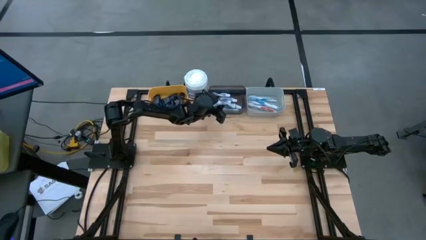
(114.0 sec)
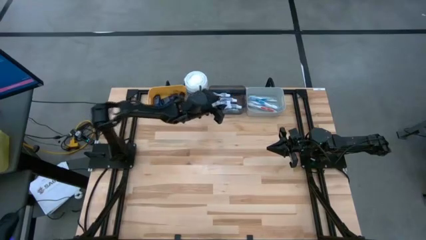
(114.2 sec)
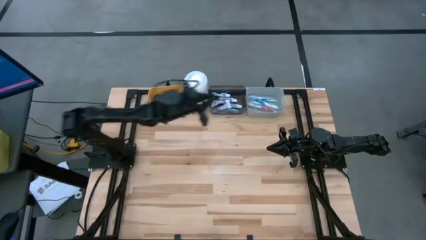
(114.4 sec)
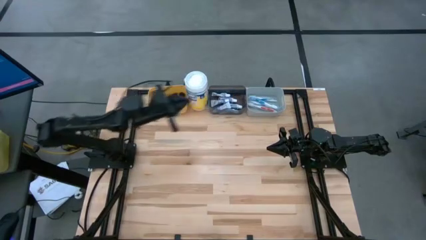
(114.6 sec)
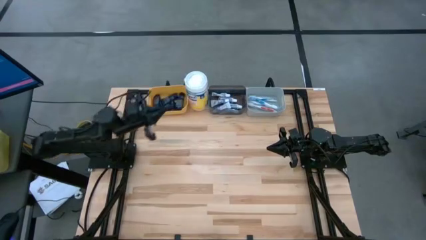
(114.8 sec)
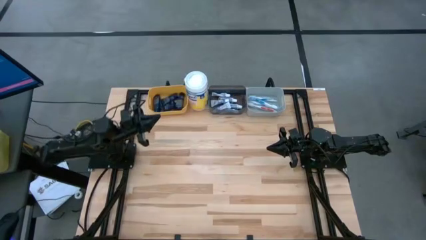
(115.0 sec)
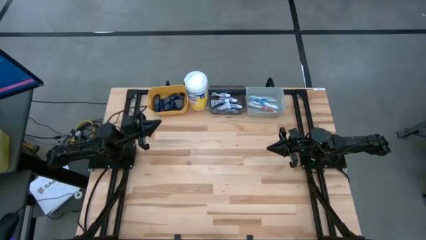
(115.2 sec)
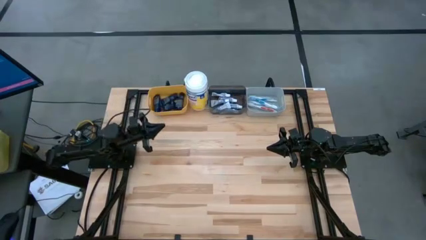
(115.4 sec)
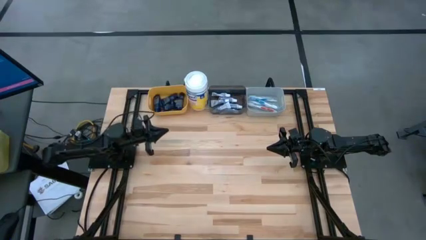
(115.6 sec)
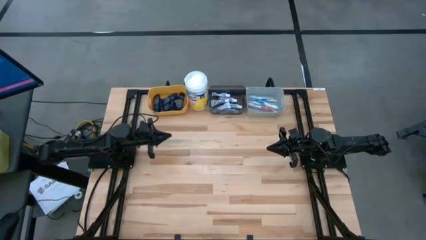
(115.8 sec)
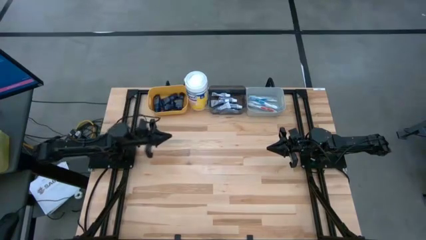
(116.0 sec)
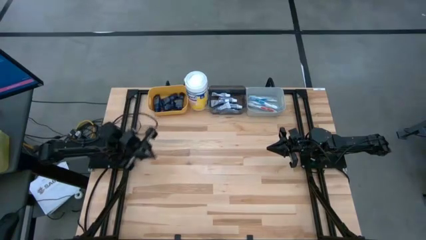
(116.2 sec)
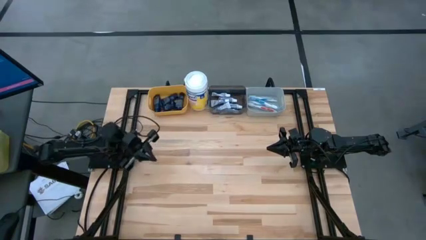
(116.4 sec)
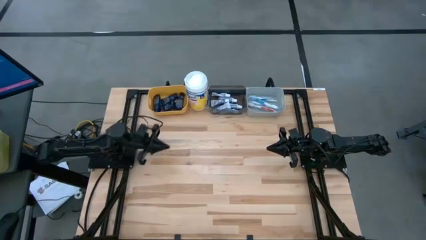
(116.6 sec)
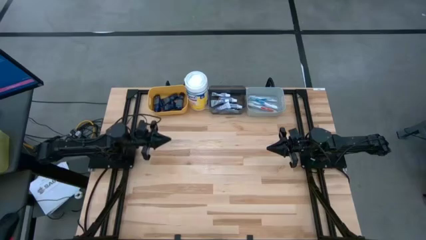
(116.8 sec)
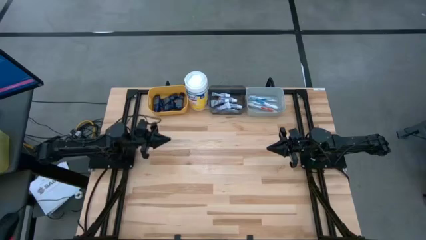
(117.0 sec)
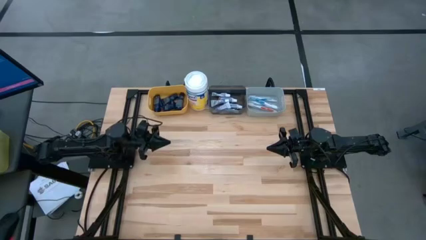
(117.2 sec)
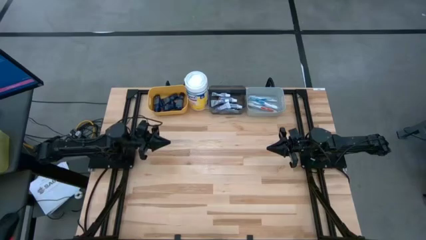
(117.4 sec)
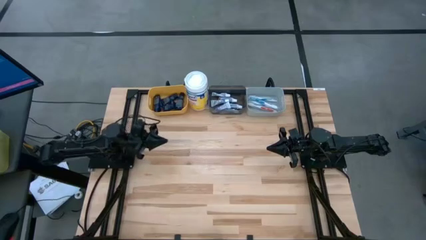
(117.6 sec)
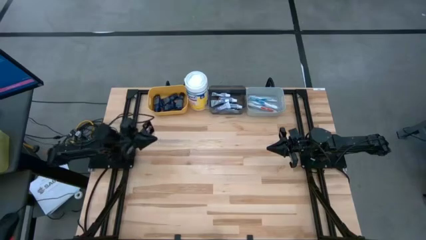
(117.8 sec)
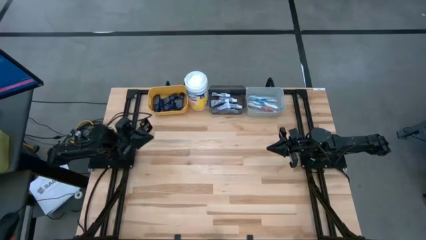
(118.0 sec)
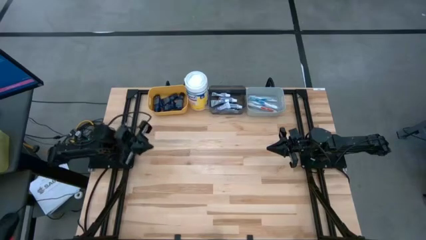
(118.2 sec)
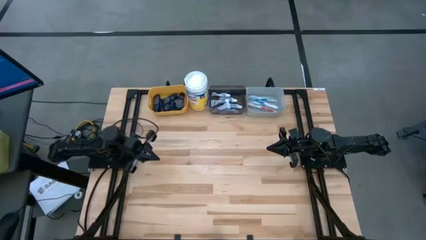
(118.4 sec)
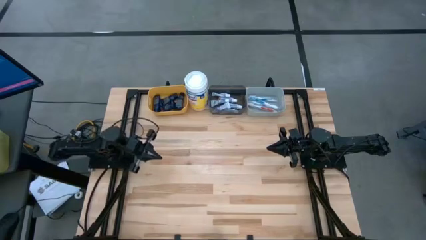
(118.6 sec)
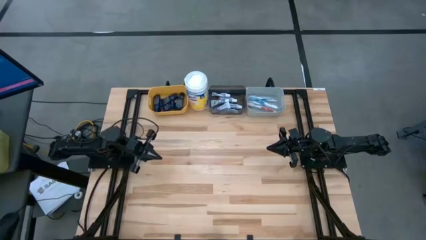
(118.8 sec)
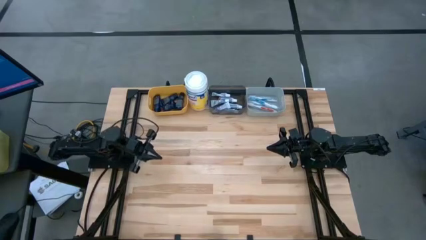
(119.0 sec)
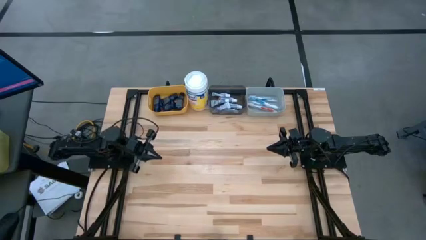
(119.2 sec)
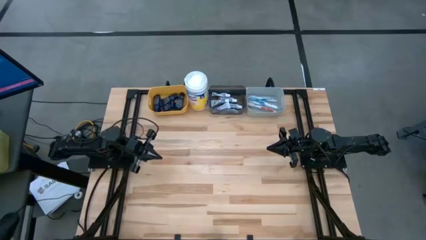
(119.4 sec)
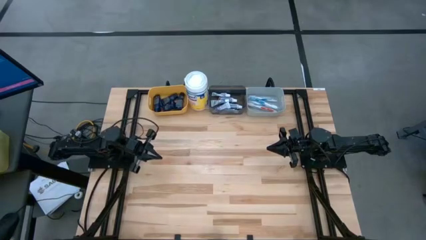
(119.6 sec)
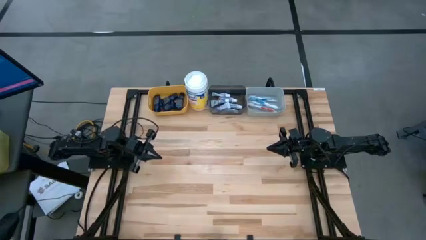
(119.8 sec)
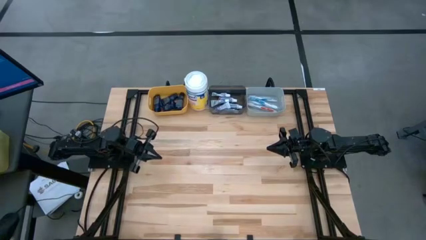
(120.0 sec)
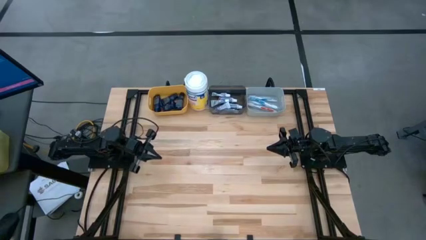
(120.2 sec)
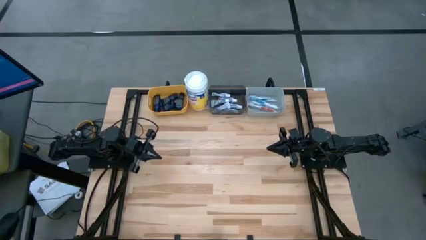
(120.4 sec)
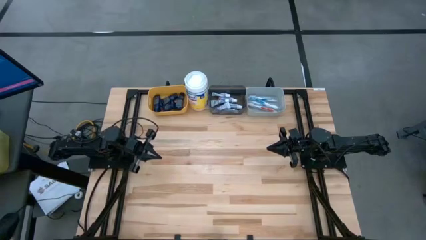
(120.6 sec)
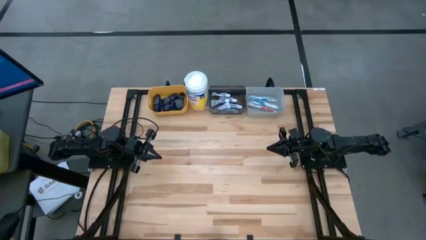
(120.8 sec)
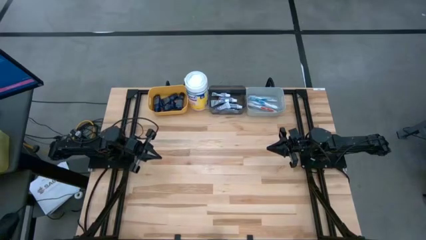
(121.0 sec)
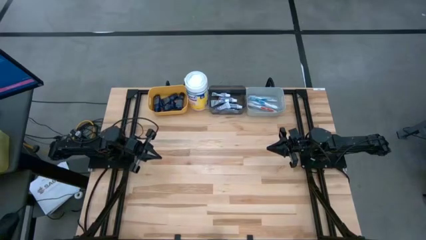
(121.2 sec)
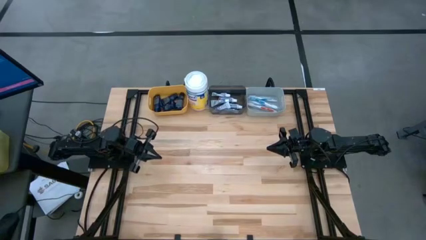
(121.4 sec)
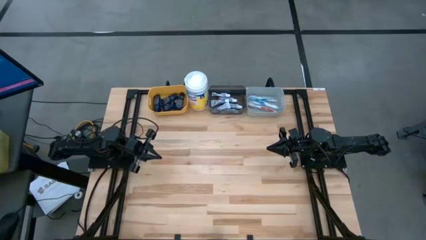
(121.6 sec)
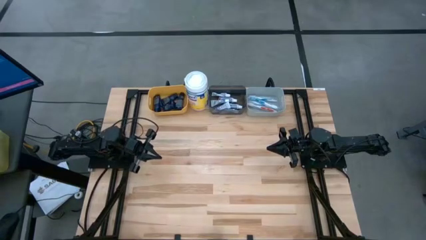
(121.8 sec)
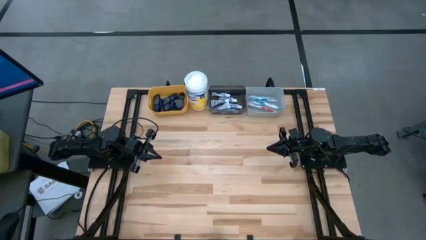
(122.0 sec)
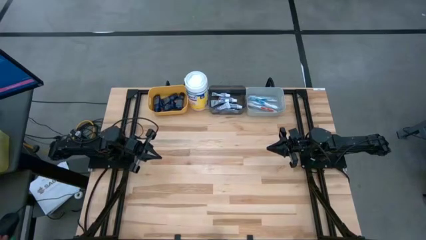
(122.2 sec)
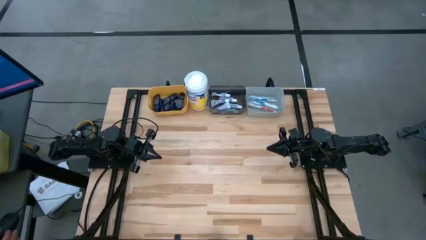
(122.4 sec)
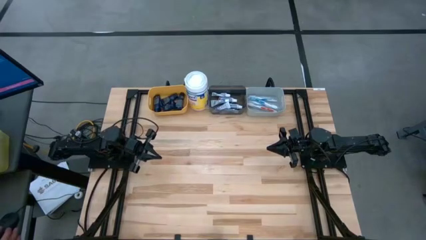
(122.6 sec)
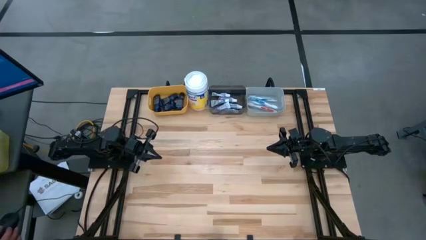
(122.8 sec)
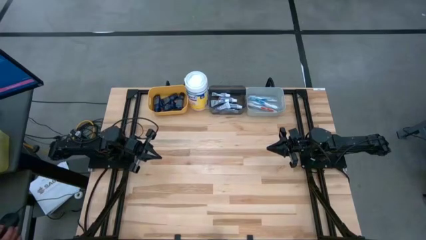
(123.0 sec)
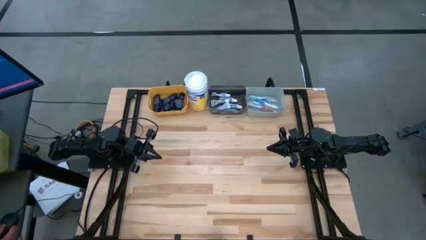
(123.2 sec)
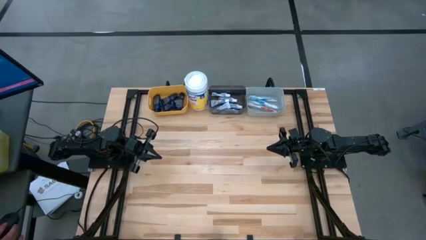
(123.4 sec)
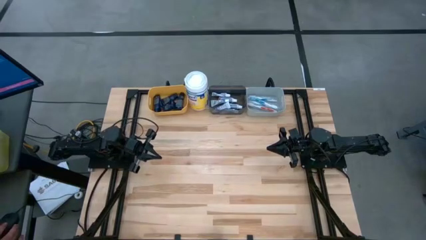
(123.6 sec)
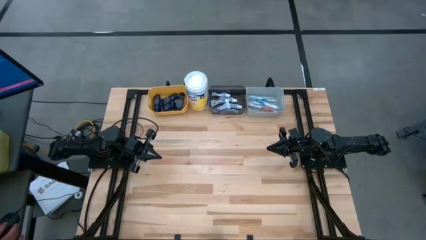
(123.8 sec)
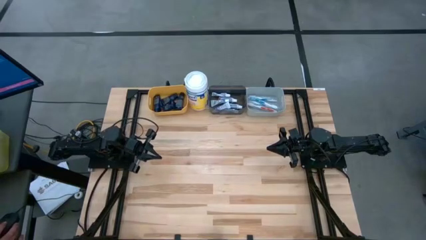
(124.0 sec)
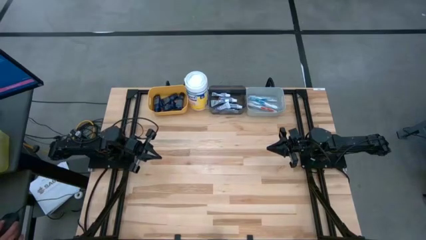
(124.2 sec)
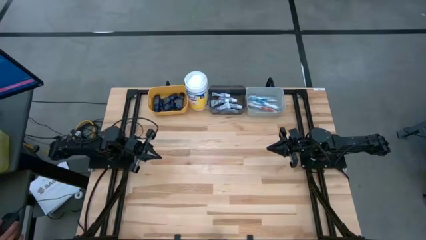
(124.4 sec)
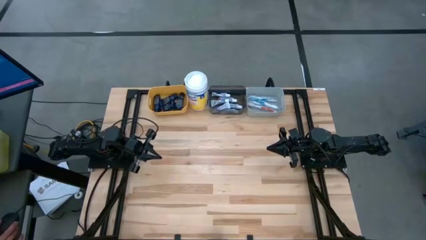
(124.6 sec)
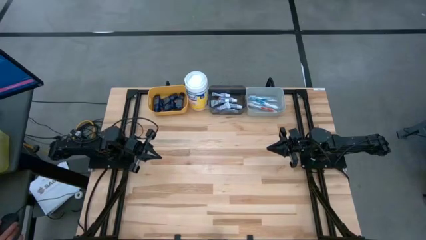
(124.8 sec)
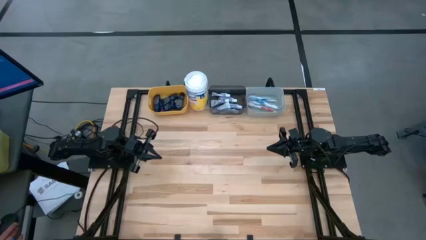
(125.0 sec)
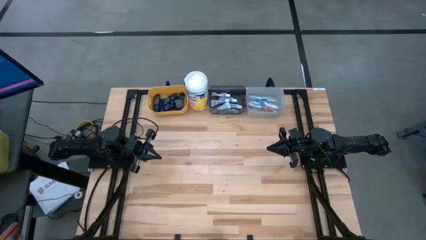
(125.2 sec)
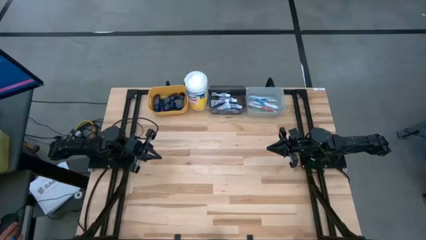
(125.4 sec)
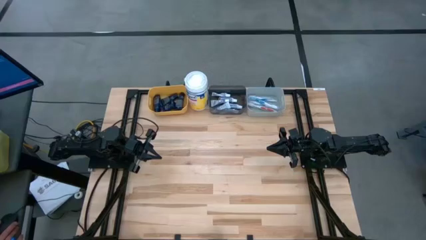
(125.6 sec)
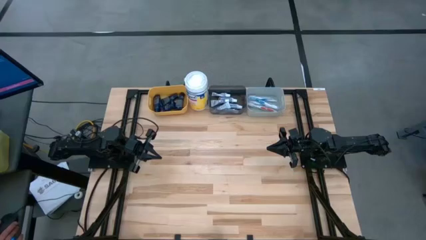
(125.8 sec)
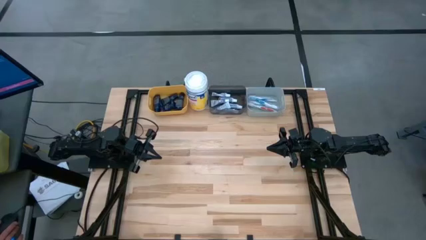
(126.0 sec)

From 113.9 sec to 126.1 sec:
Task: Pick & Place Travel size toiletries
Return to Home Position

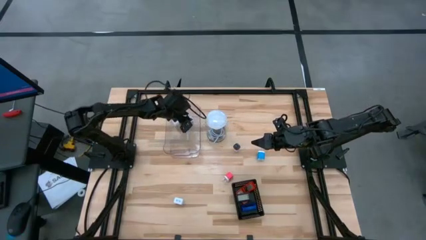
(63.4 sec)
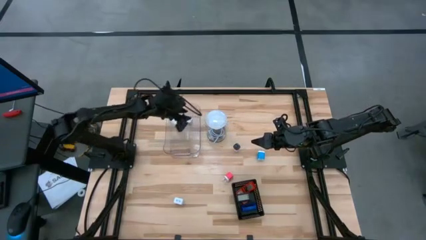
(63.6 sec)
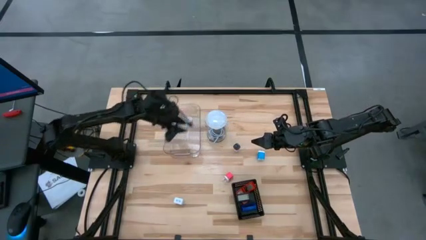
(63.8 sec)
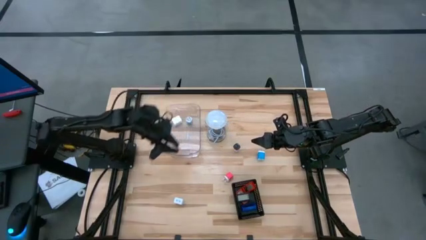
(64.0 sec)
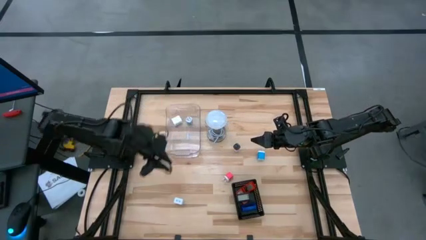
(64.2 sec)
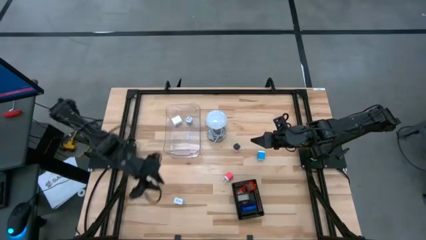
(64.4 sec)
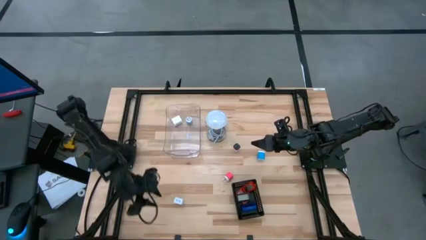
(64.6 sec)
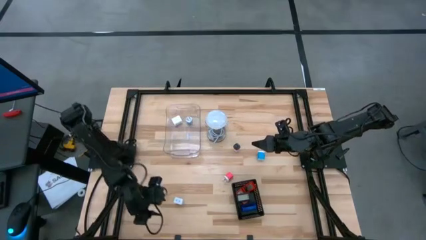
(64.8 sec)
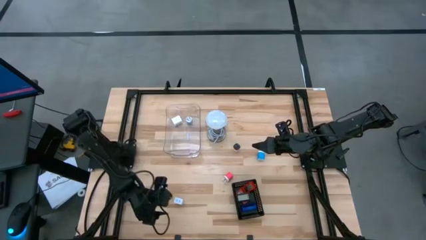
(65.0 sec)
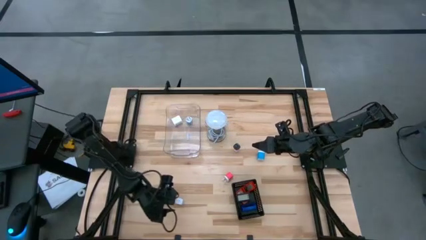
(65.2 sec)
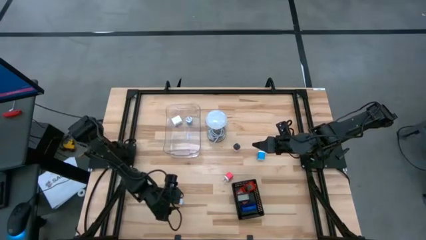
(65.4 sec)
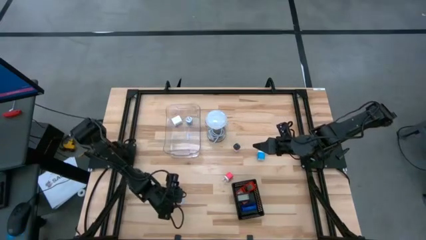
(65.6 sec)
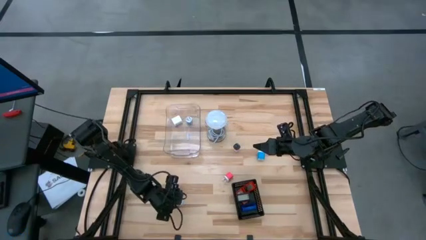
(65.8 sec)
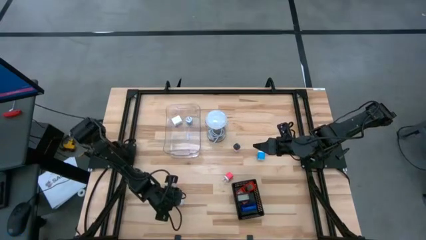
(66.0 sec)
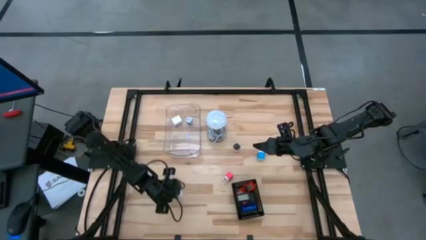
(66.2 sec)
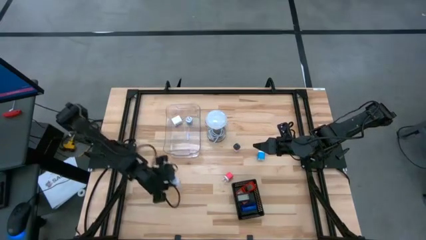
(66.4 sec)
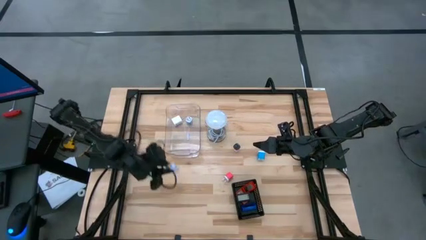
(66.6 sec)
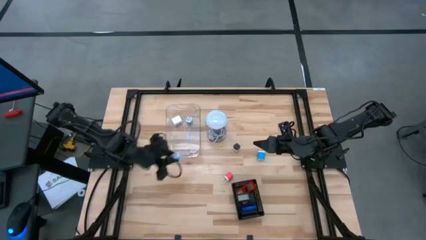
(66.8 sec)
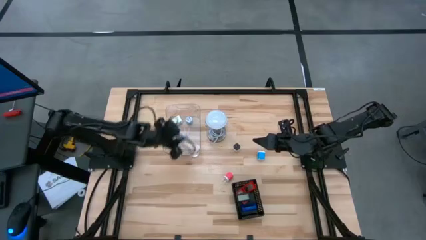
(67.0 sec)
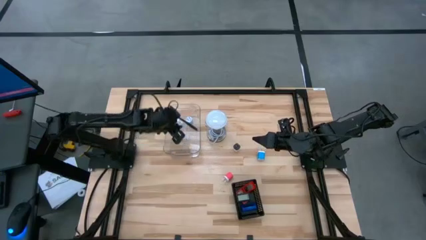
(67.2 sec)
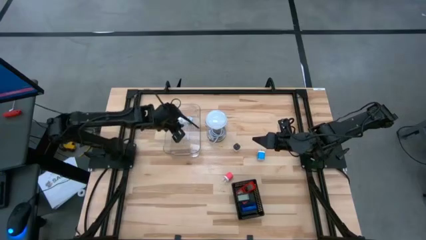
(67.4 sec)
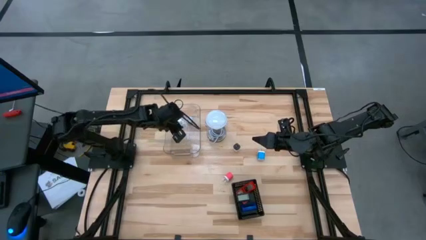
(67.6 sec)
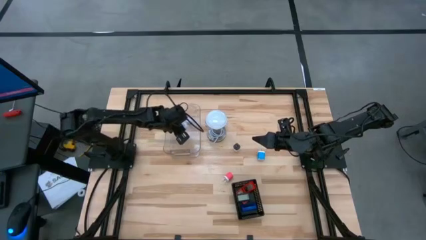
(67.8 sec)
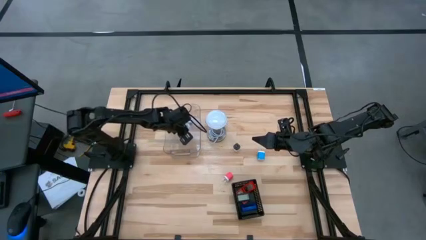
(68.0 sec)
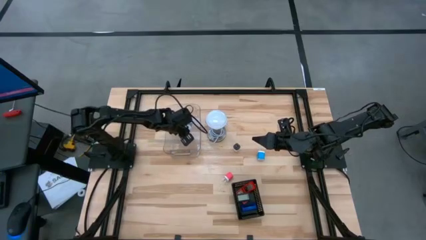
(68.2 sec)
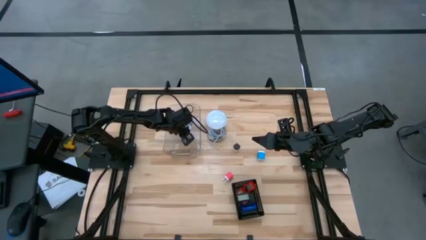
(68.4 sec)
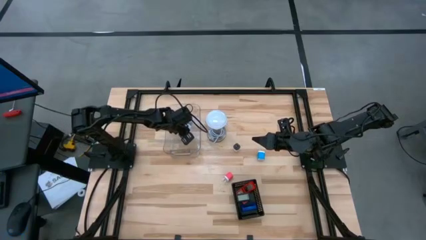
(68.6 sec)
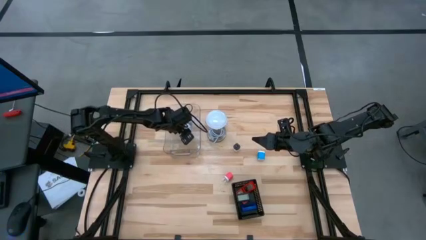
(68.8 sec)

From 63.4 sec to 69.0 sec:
Task: Pick & Place Office items
Put the white charger adapter into the transparent bin
